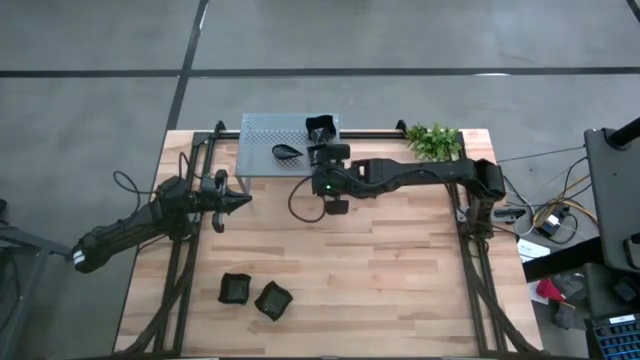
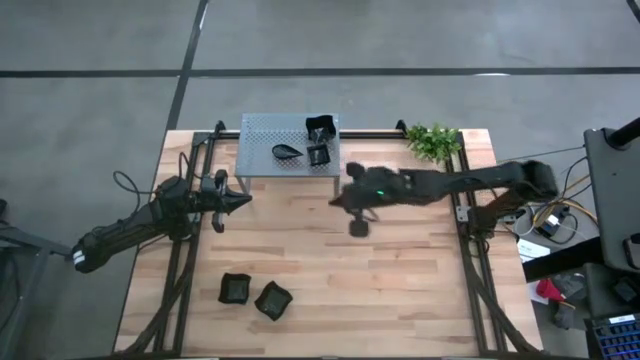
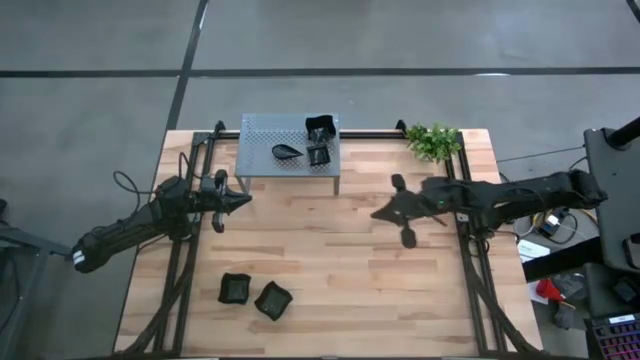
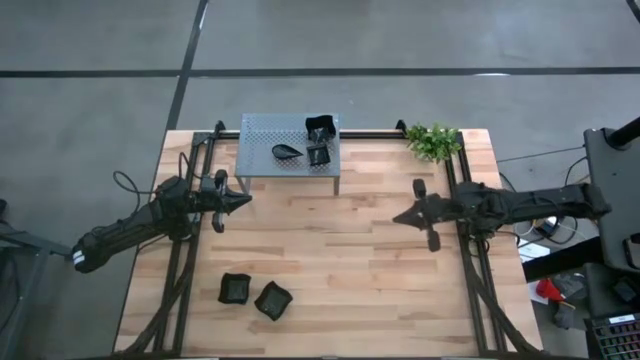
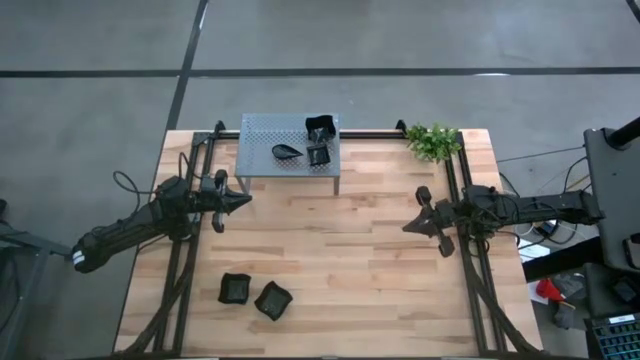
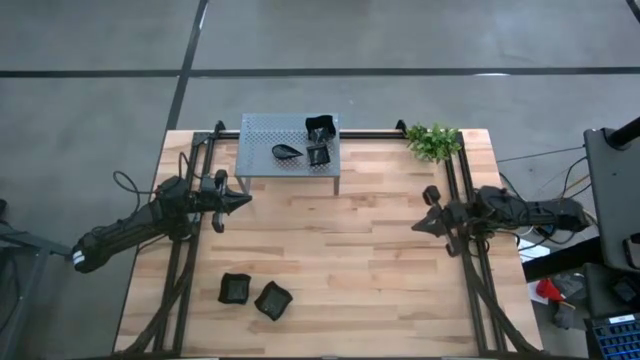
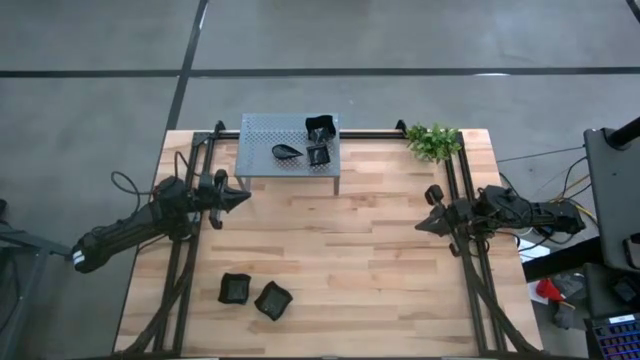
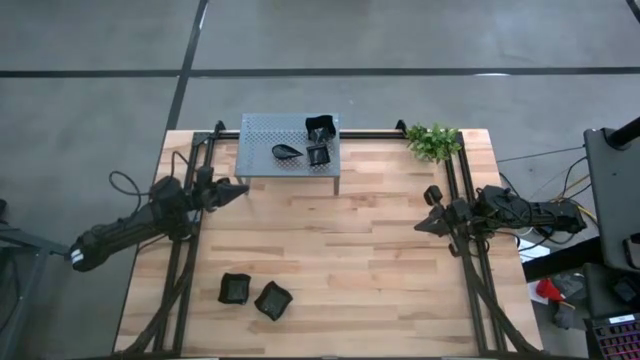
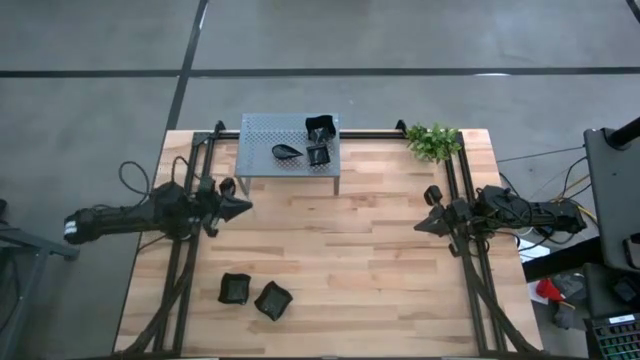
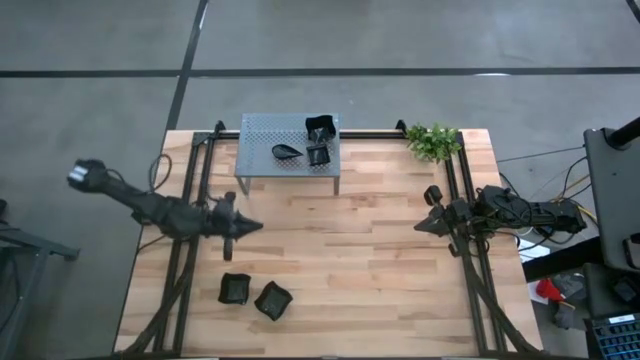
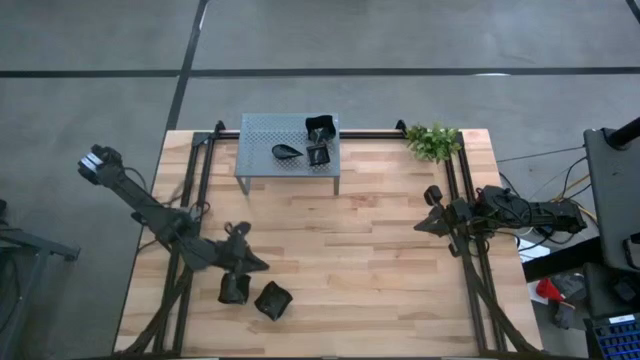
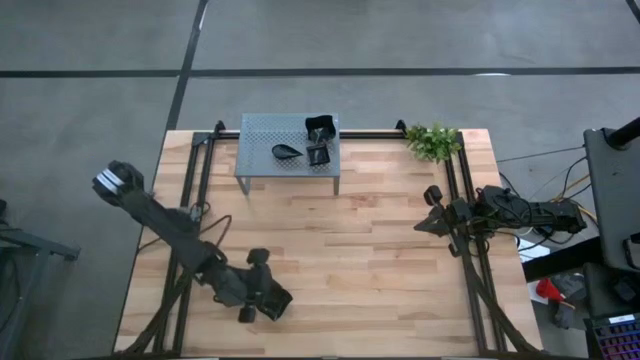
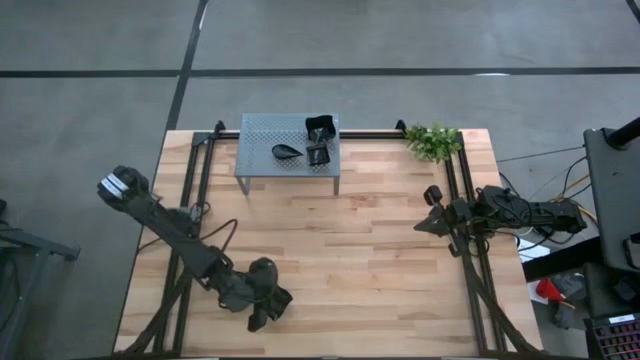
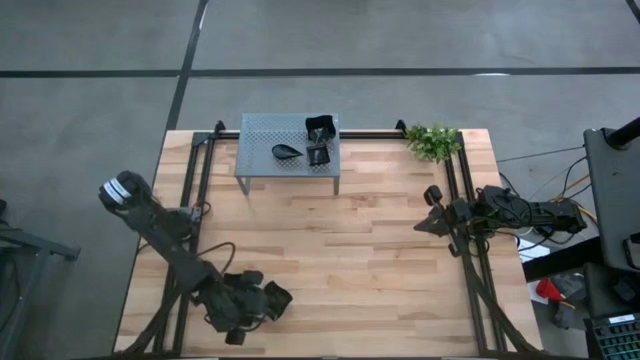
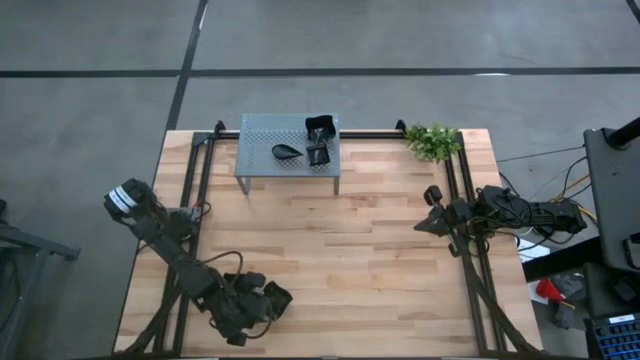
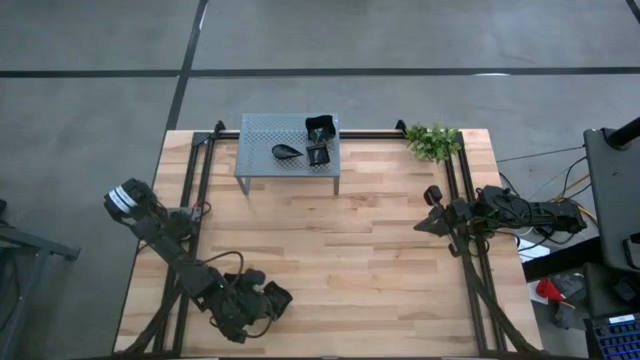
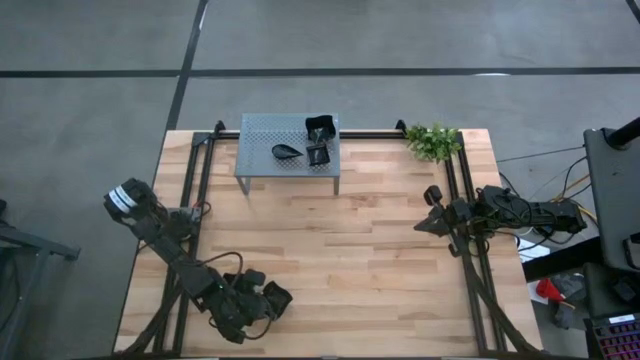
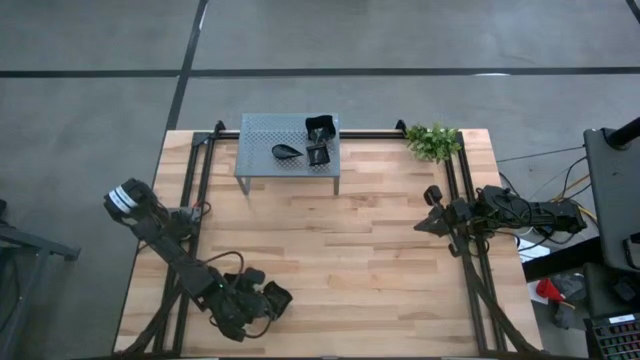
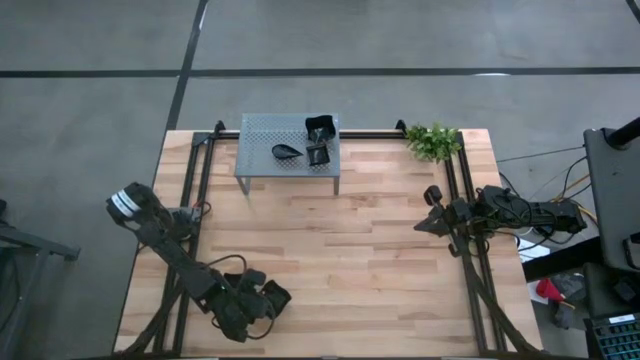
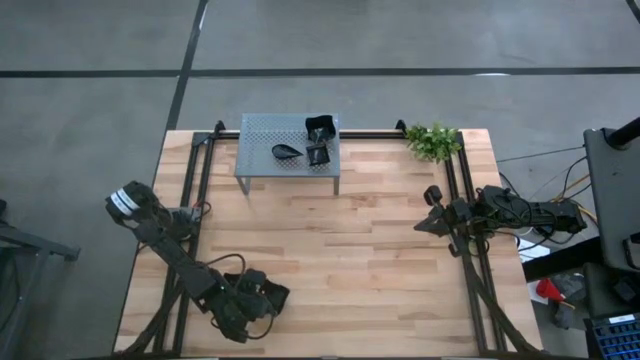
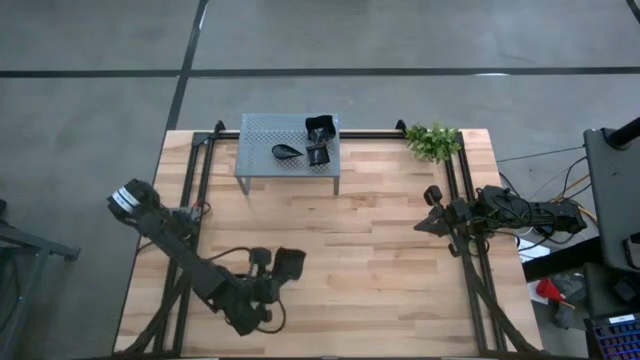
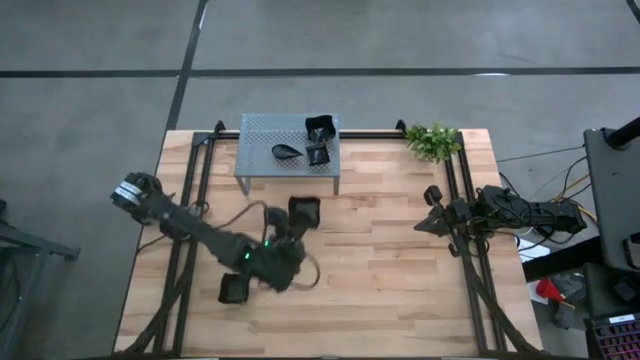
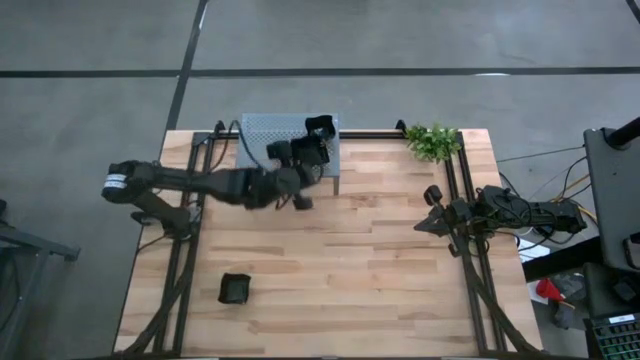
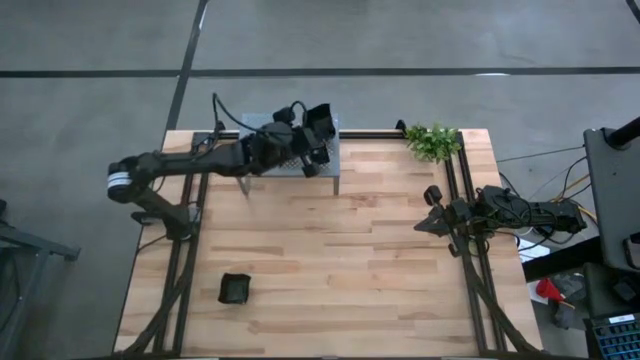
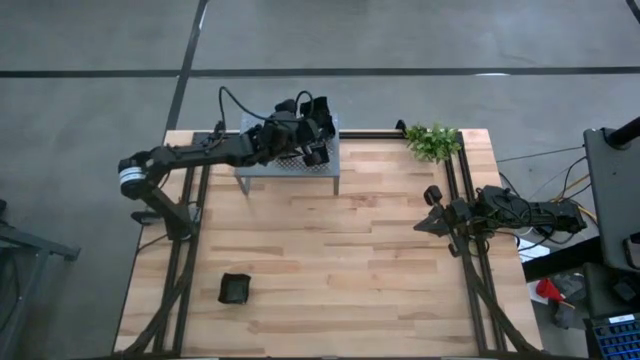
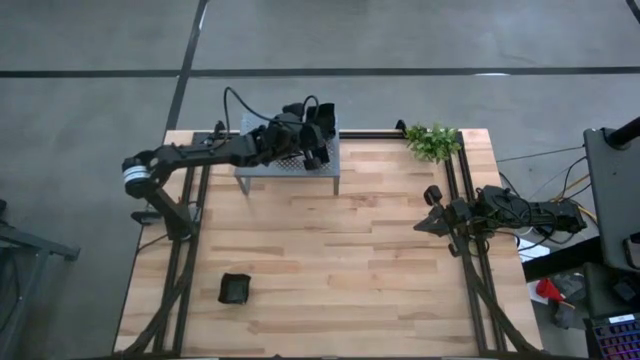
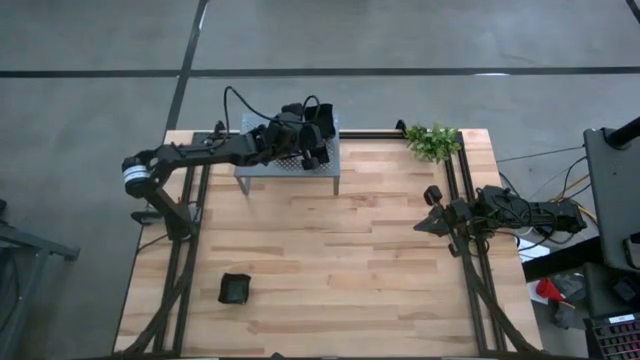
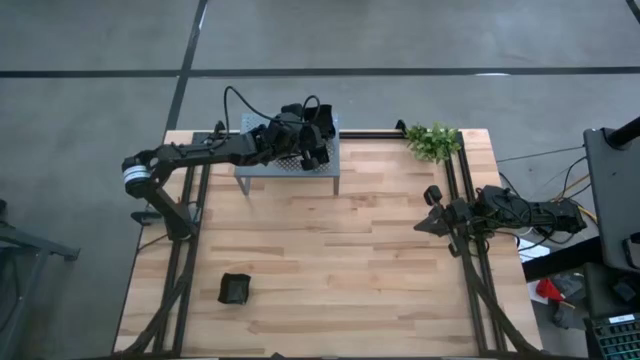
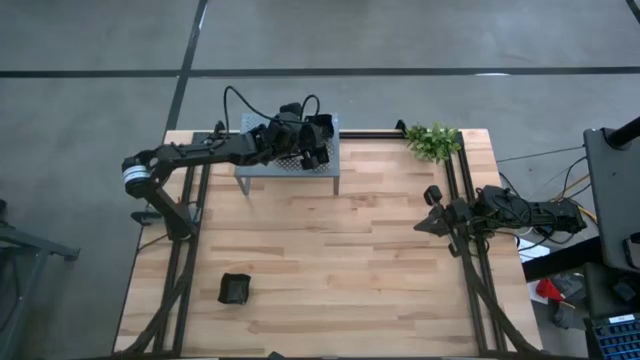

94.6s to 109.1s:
Task: Pick & Place Mini shaped plates
Stack the black distorted square plate on top of the other black distorted square plate on the shelf

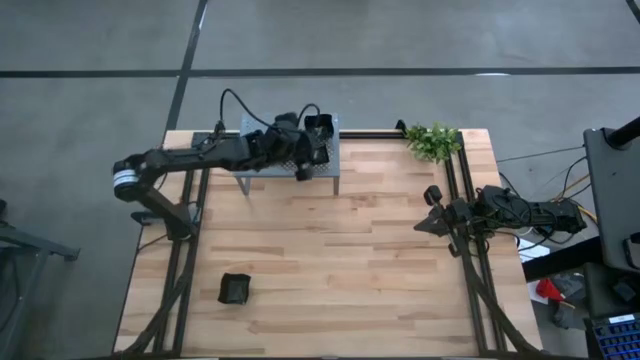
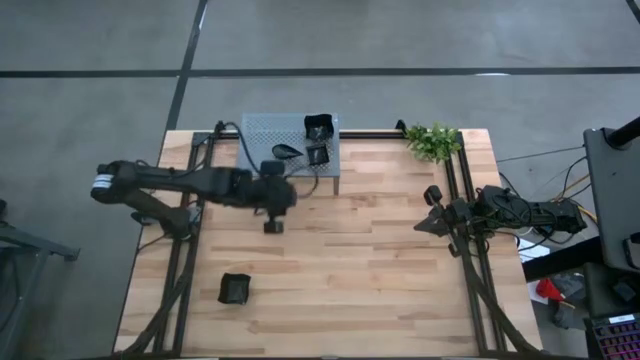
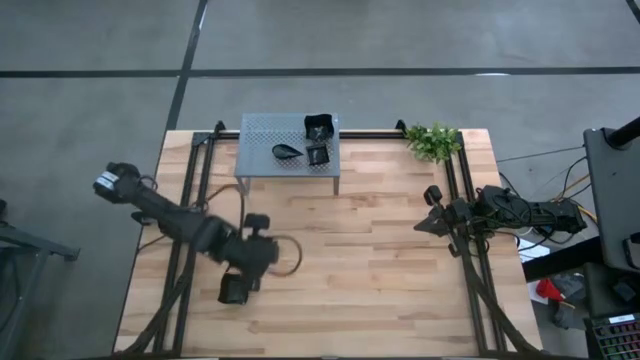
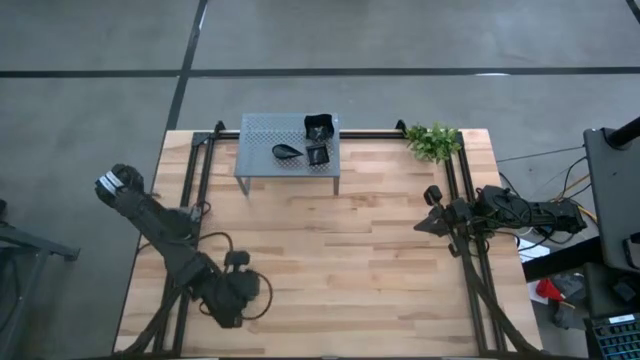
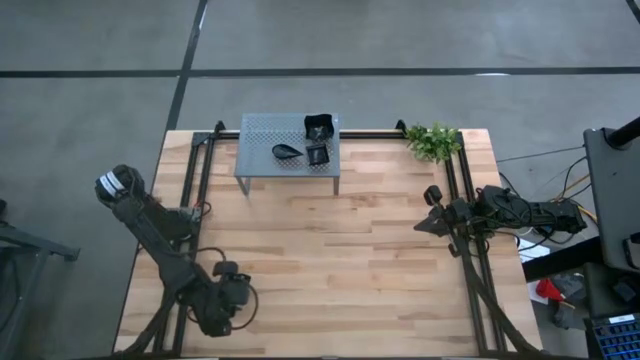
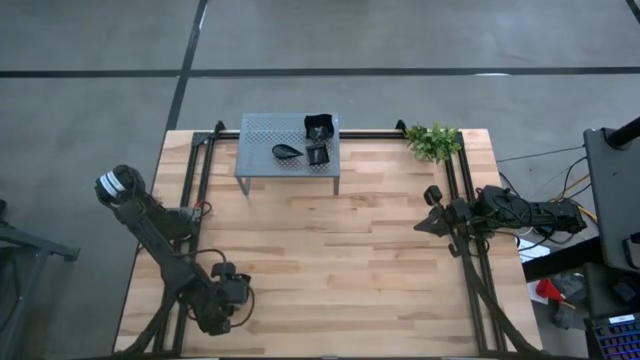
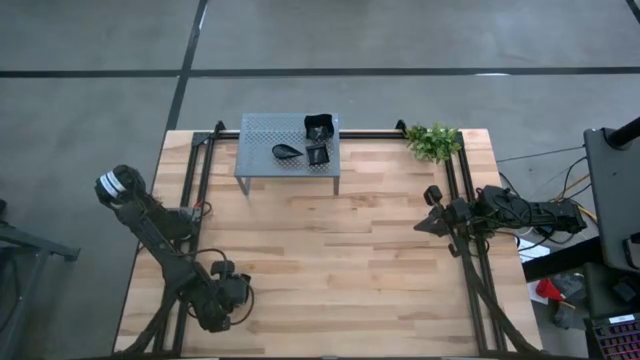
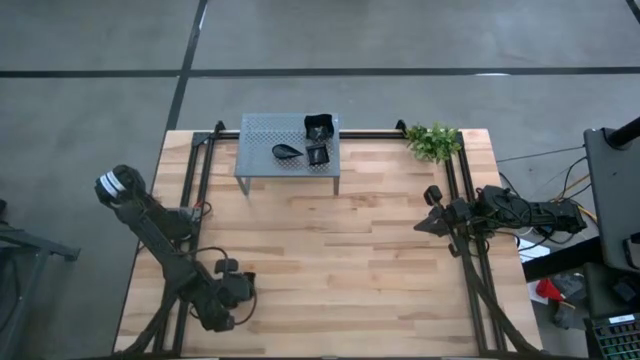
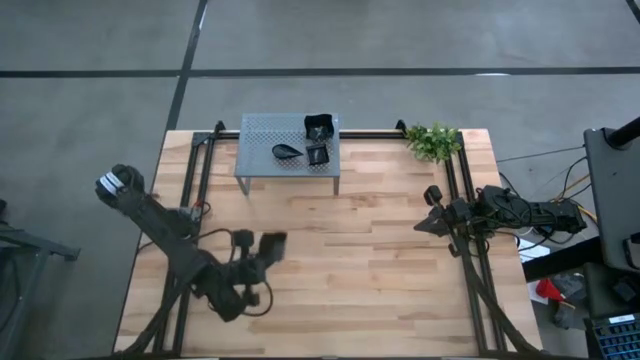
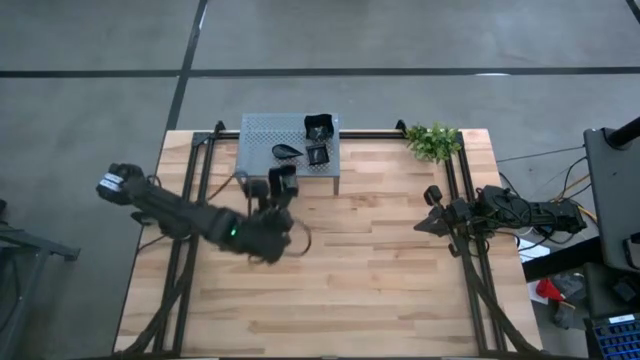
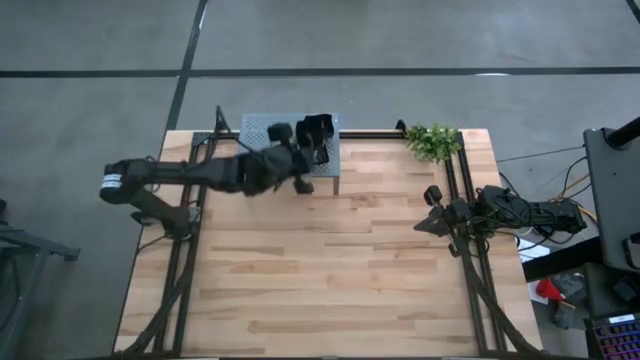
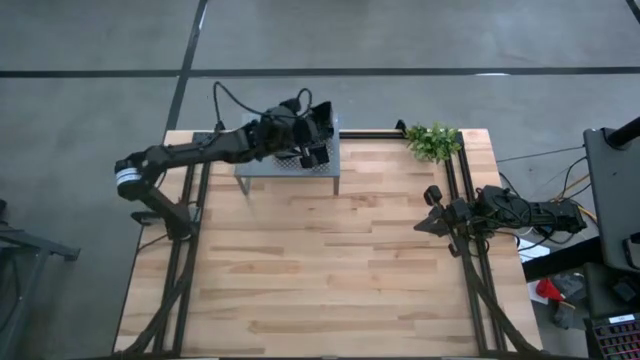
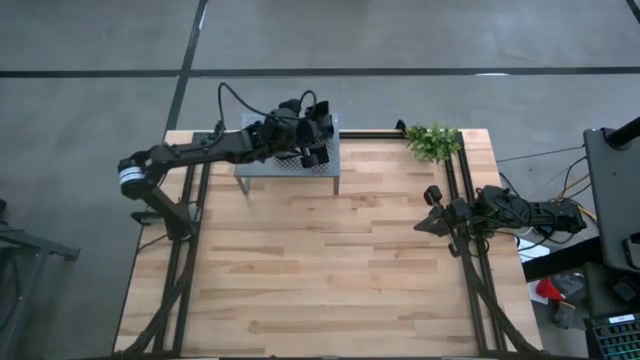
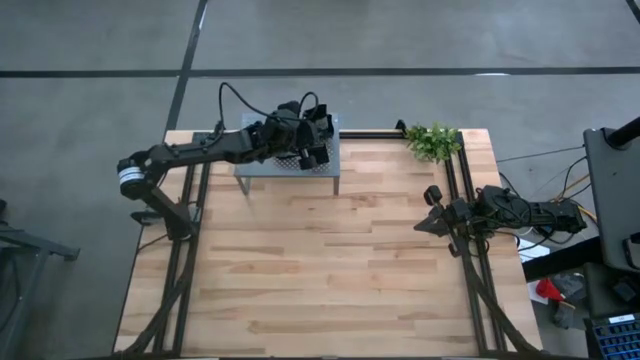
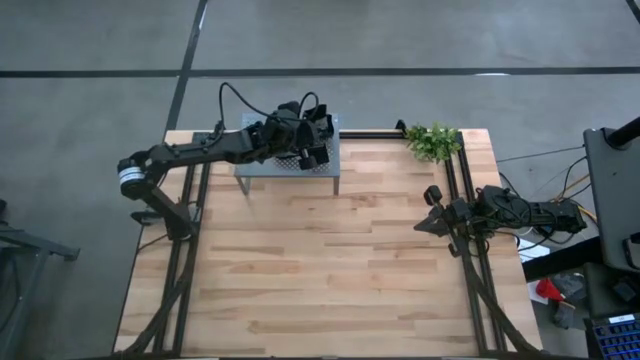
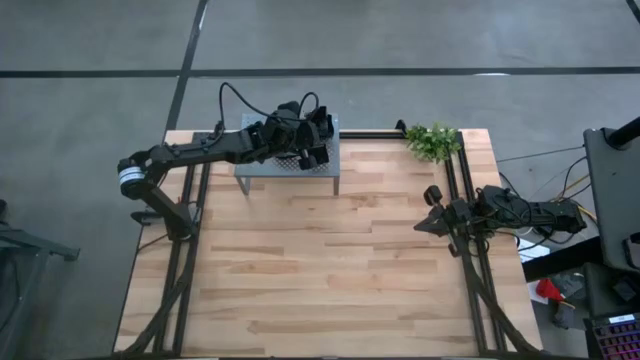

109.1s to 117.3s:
Stack the black distorted square plate on top of the other black distorted square plate on the shelf
